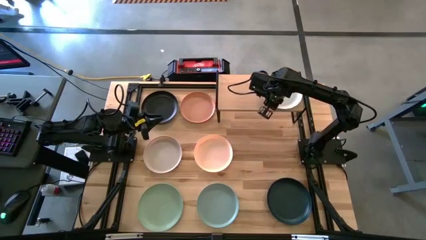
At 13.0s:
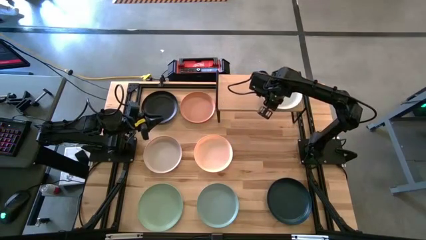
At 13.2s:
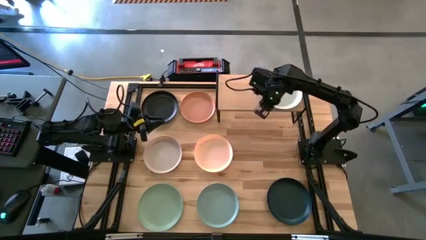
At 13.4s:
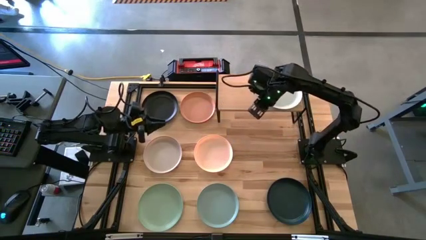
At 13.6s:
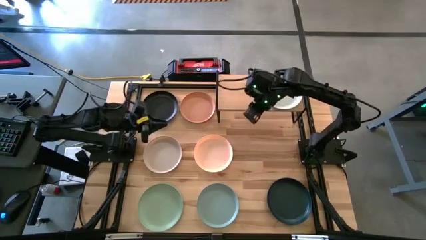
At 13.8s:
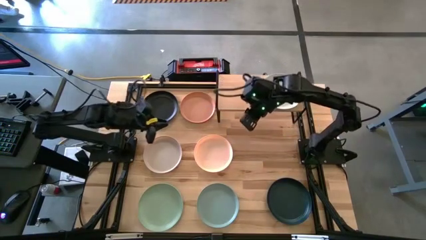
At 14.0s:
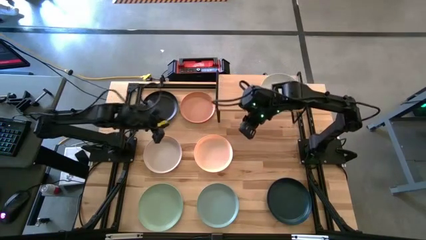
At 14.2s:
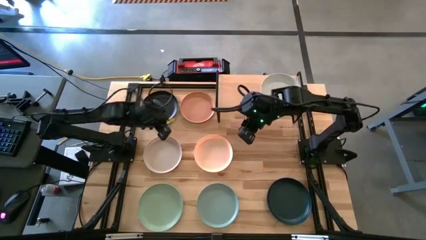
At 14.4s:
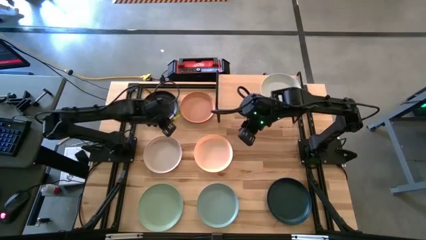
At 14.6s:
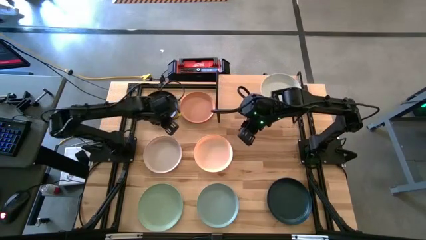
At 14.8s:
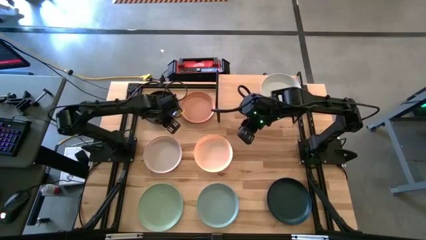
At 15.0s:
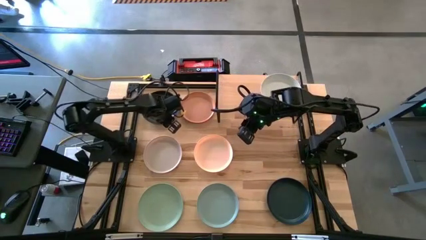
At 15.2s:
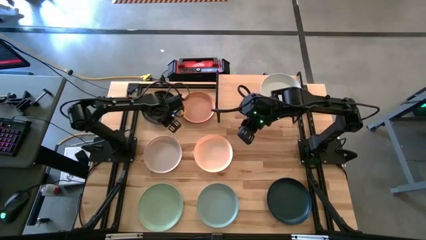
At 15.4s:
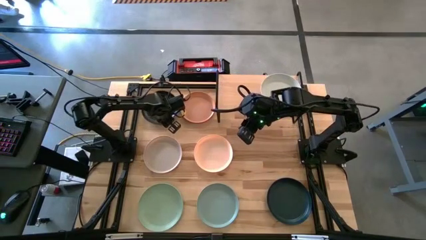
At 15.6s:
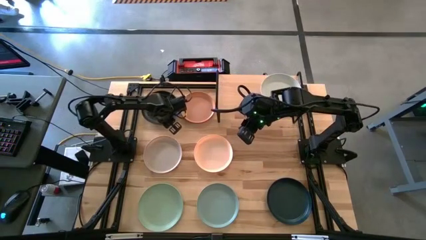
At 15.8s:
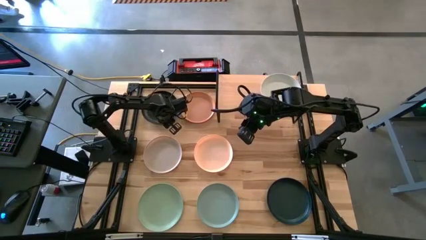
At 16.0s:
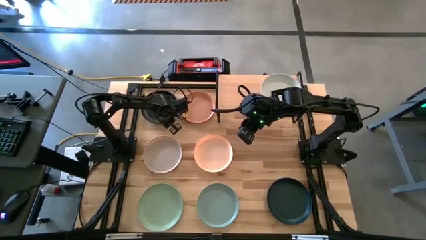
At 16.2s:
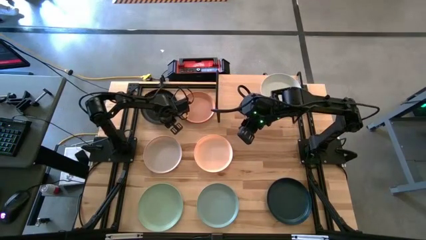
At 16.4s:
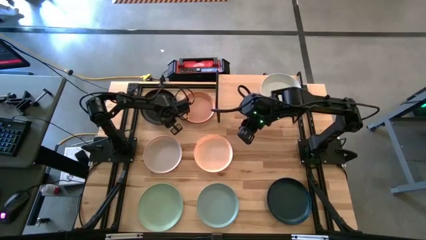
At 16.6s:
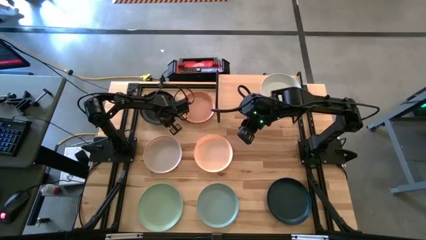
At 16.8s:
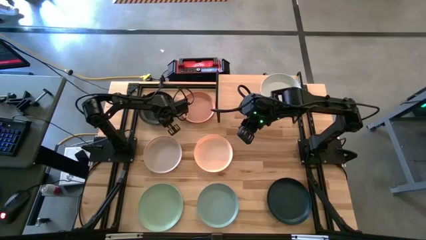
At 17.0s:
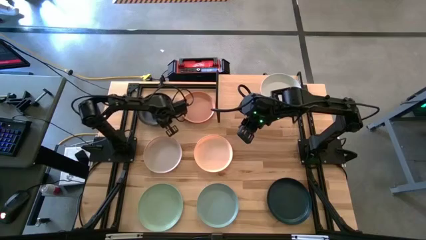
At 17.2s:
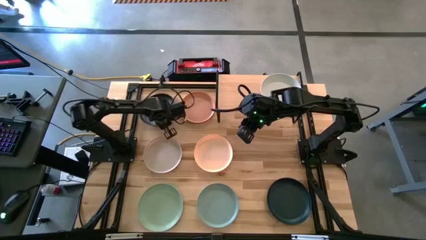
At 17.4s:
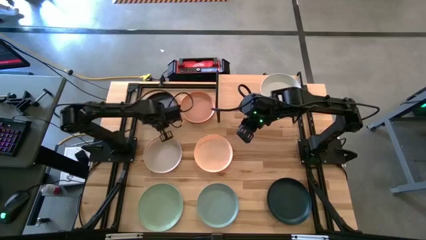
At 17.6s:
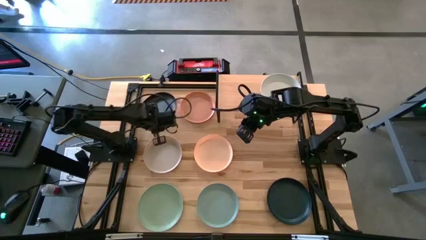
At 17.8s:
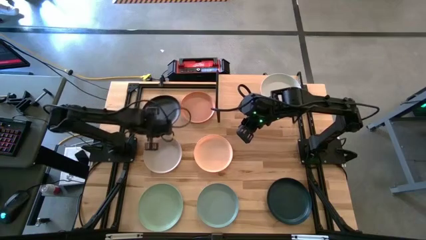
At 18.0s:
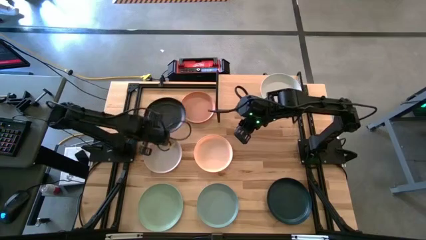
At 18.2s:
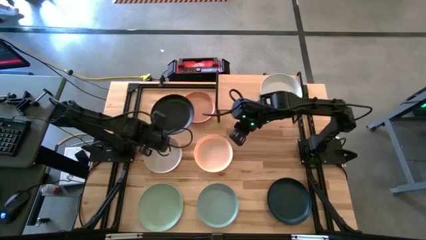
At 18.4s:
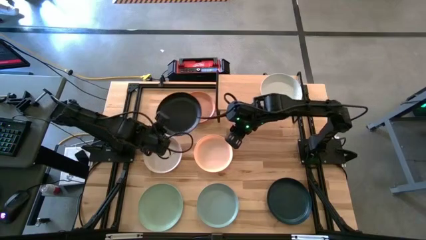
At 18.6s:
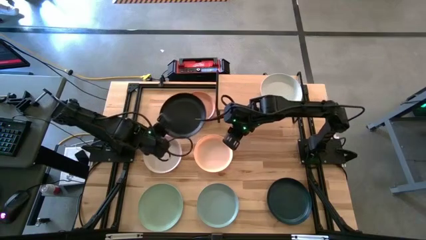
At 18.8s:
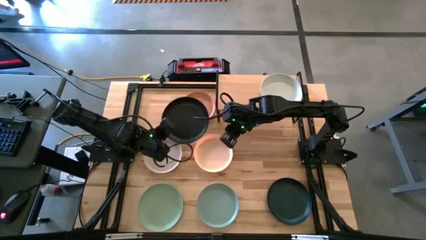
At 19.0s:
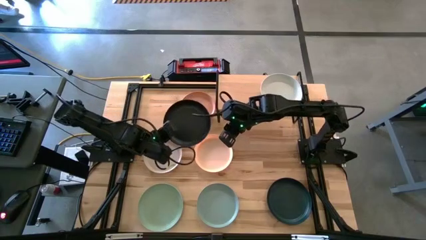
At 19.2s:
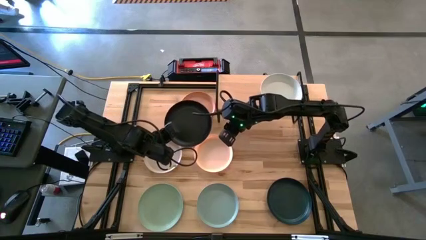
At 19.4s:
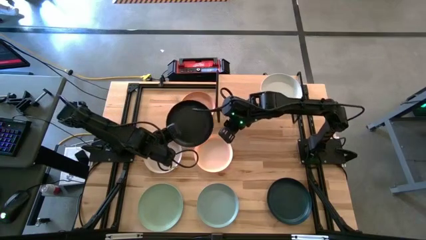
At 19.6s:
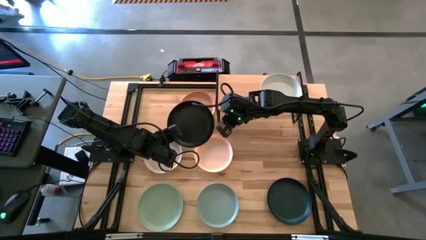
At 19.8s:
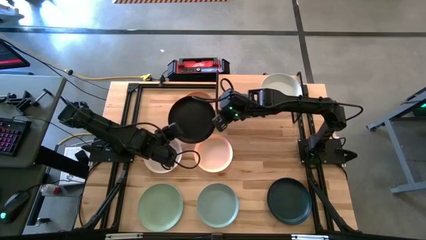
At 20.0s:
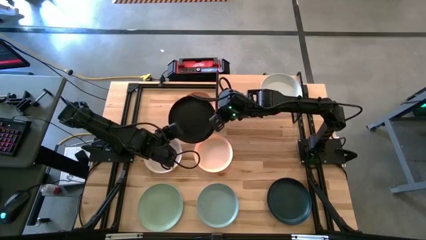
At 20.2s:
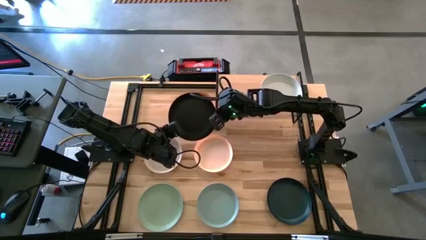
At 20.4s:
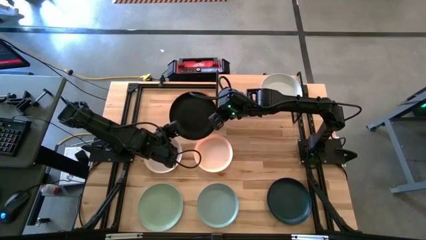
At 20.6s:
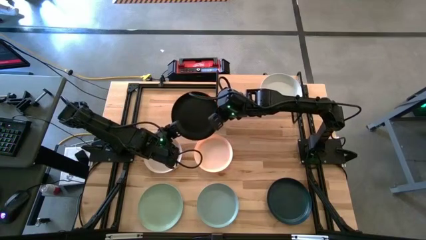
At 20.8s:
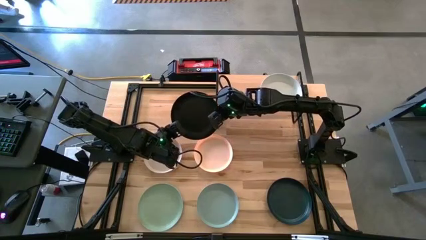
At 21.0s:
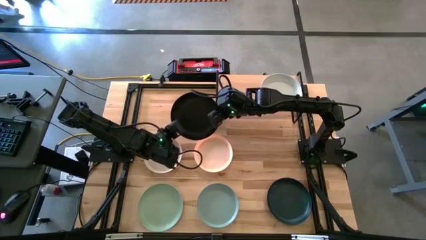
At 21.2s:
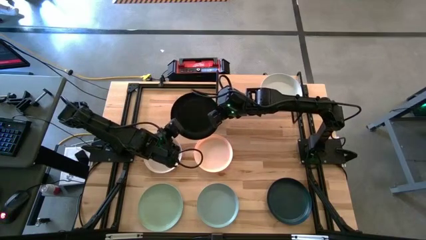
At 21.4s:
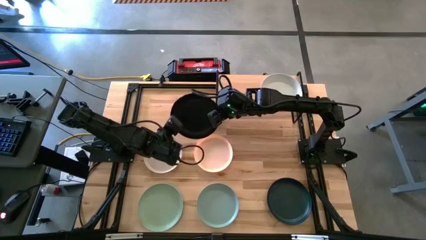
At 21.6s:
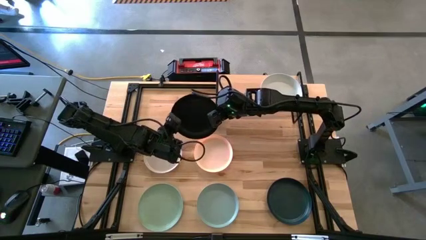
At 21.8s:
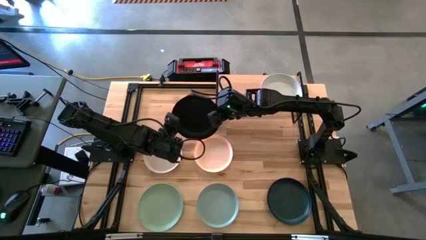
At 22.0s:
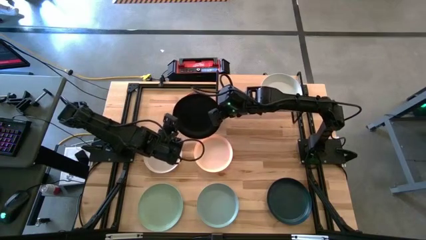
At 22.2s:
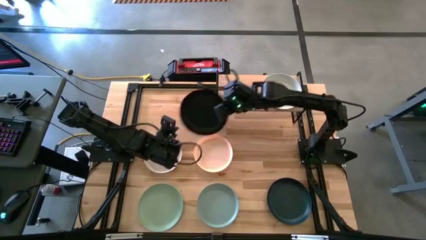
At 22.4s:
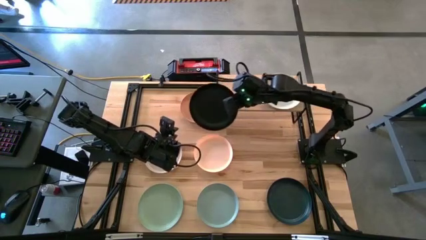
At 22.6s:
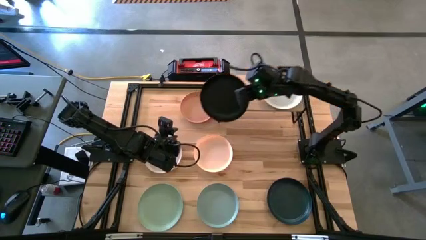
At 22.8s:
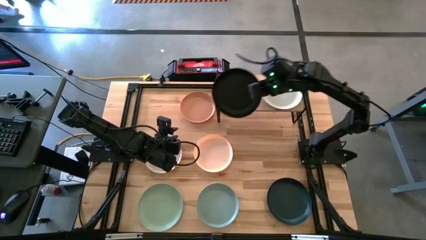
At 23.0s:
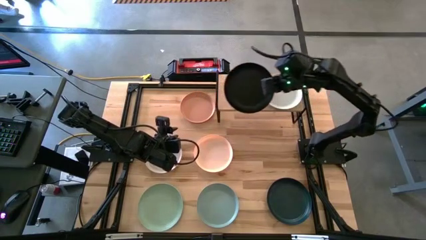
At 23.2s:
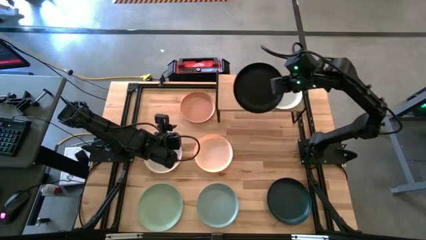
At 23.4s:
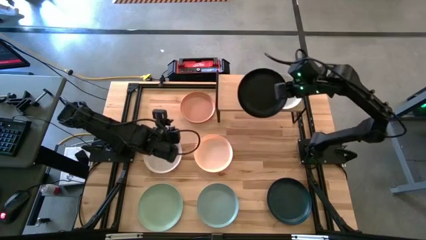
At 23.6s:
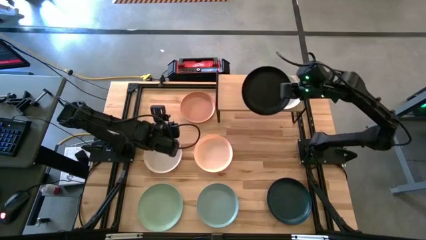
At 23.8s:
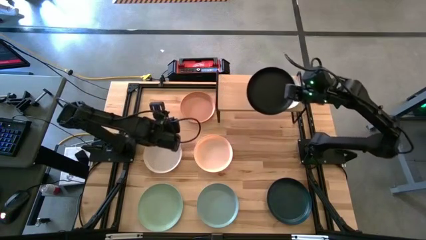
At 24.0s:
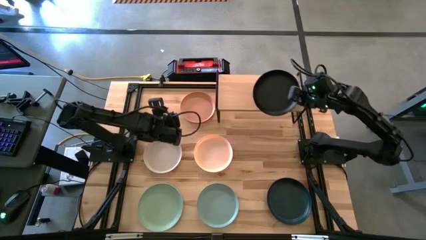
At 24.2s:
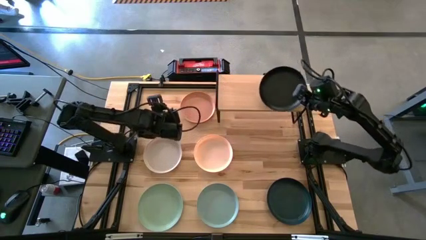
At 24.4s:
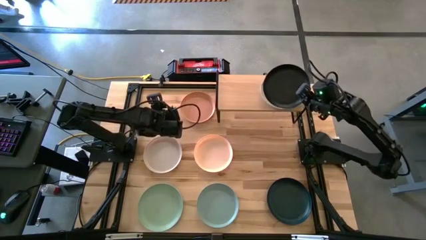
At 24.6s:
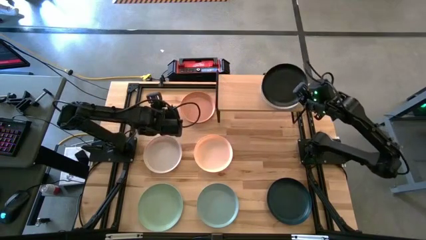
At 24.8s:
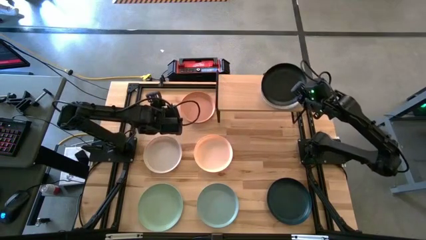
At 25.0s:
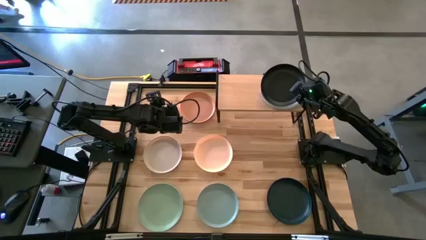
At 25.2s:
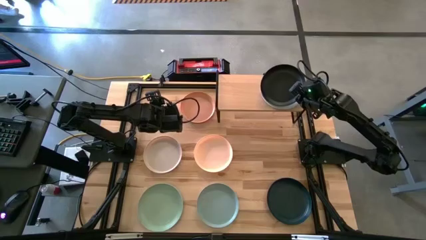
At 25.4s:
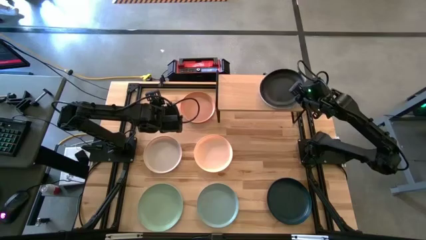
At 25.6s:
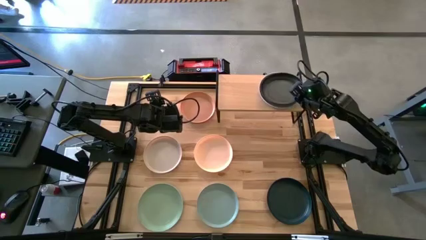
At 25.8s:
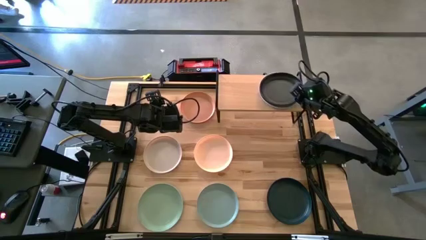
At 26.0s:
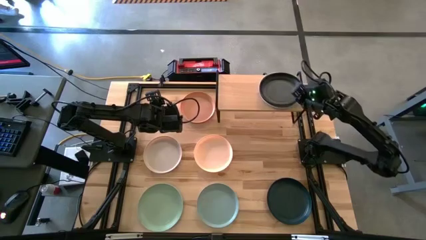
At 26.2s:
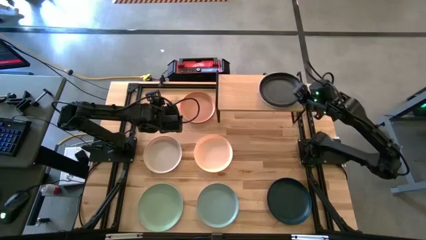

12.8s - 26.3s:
Task: Place and stack plates onto a shelf
Stack the black plate on top of the white plate on the shelf
